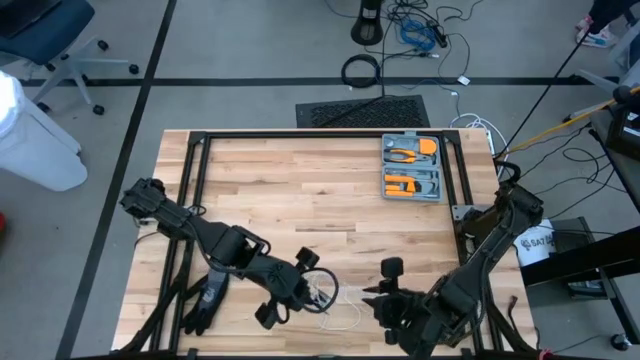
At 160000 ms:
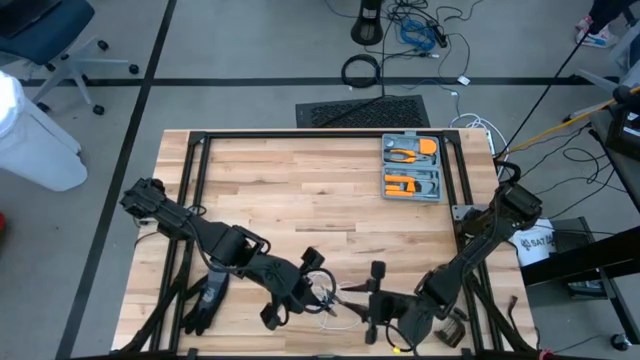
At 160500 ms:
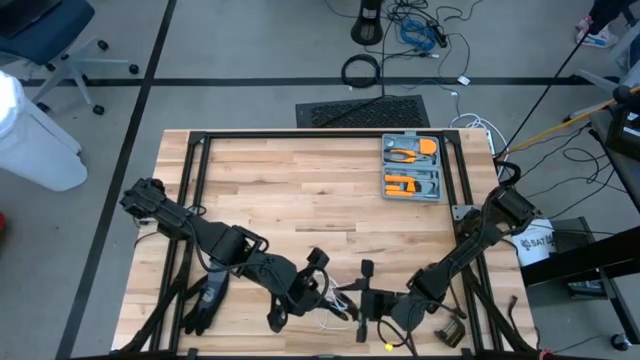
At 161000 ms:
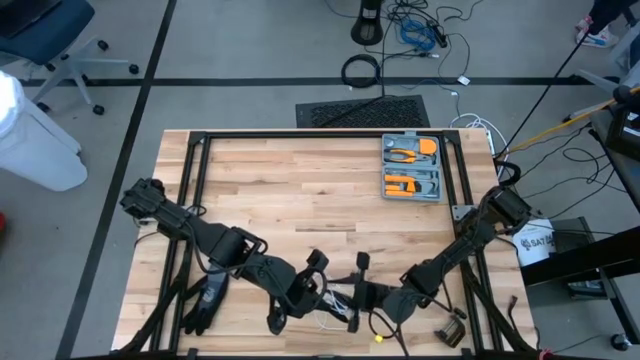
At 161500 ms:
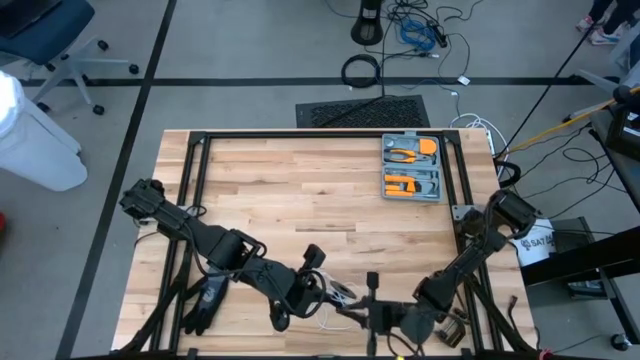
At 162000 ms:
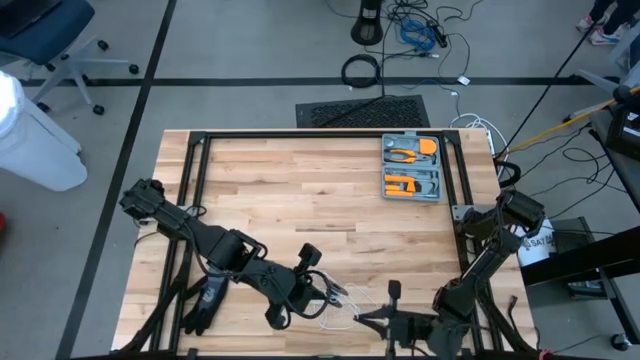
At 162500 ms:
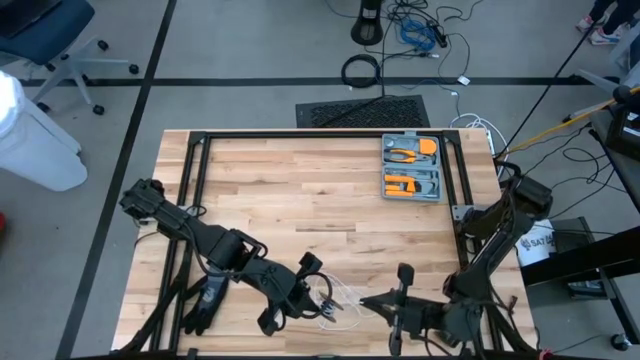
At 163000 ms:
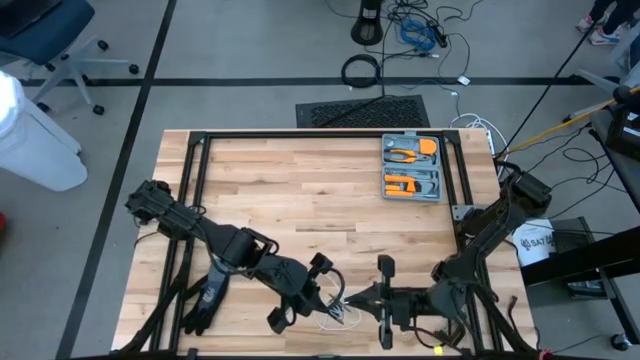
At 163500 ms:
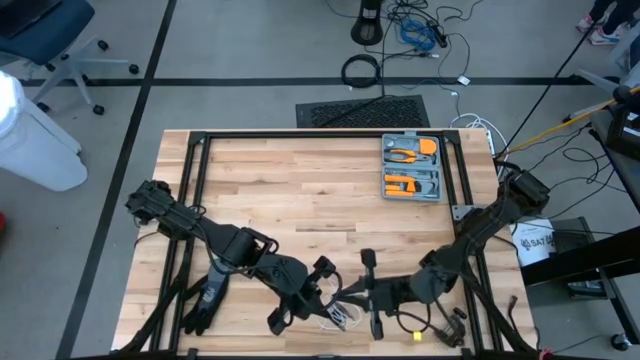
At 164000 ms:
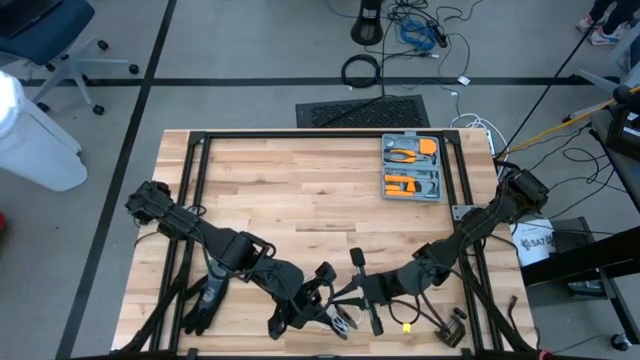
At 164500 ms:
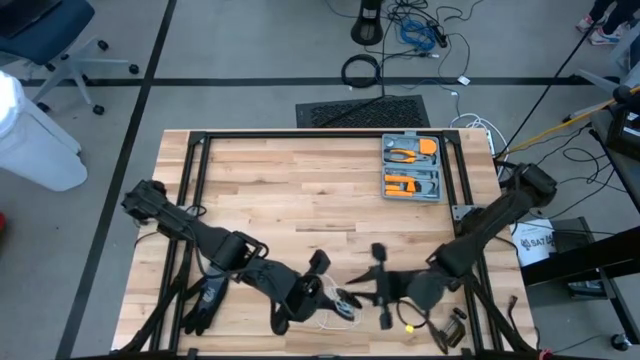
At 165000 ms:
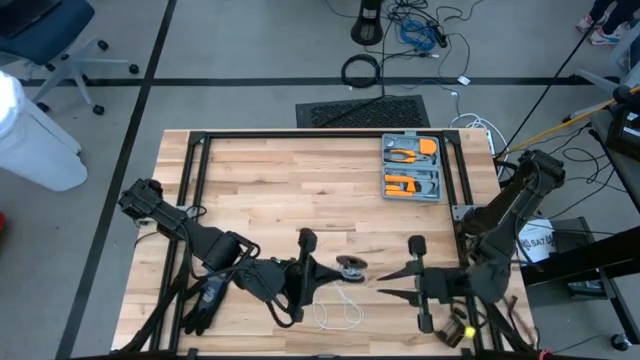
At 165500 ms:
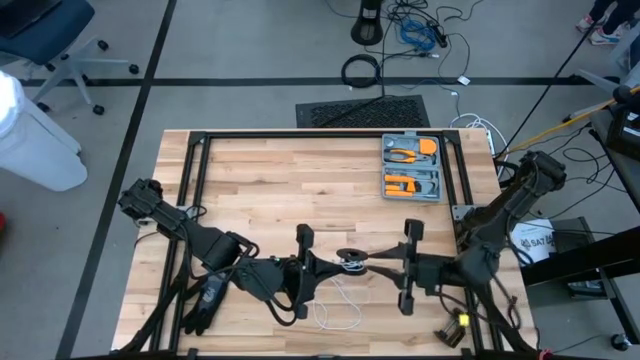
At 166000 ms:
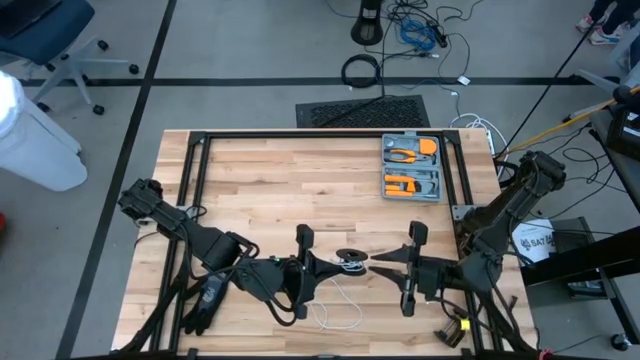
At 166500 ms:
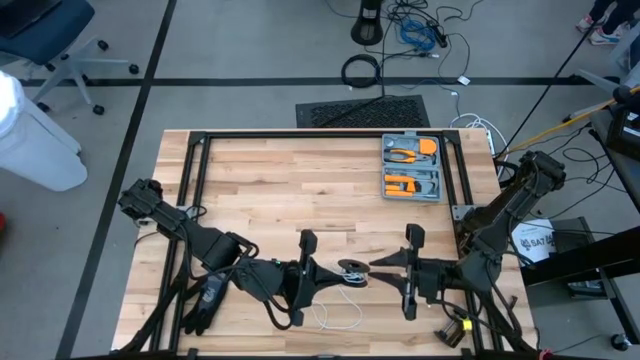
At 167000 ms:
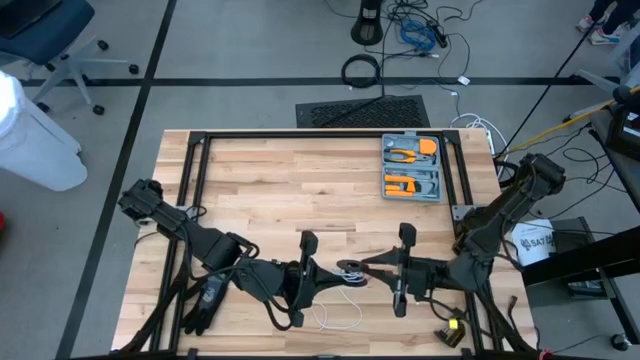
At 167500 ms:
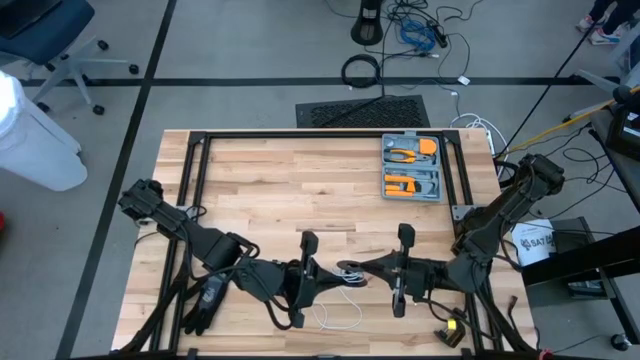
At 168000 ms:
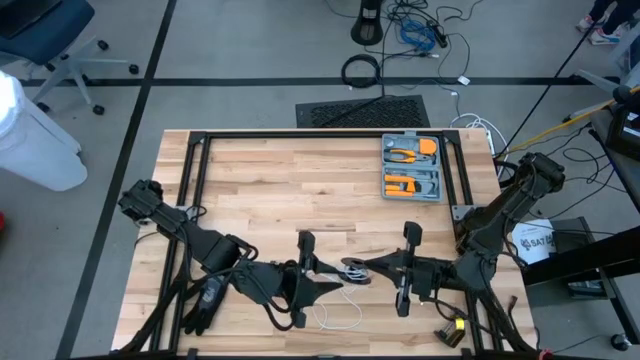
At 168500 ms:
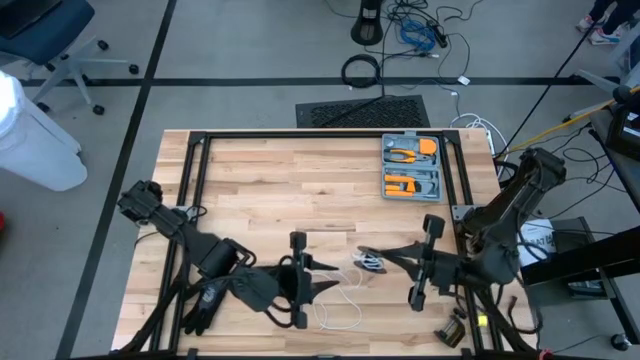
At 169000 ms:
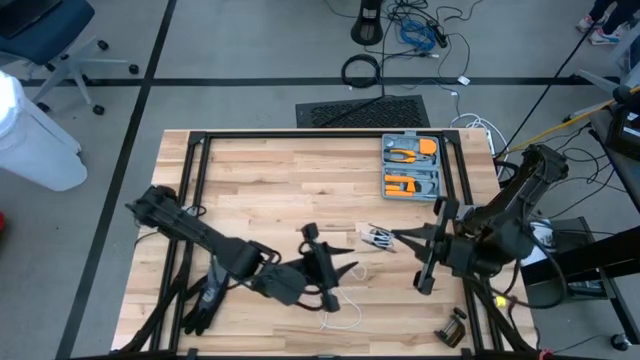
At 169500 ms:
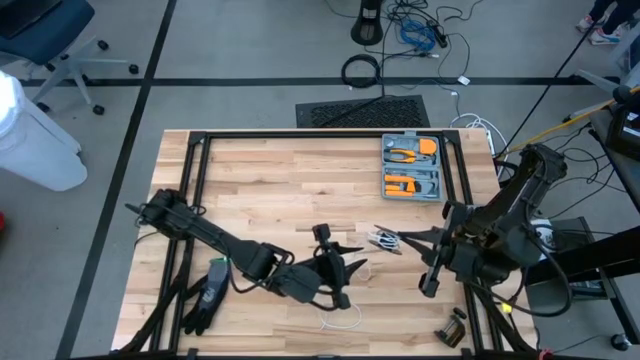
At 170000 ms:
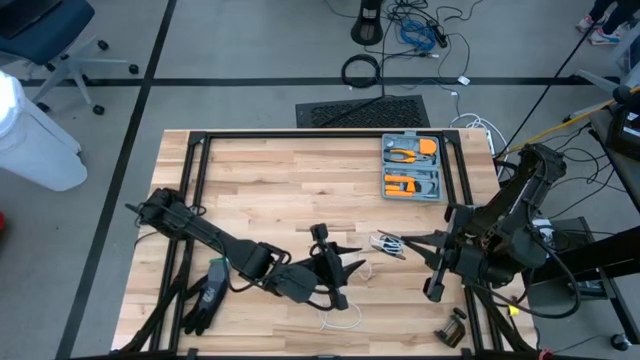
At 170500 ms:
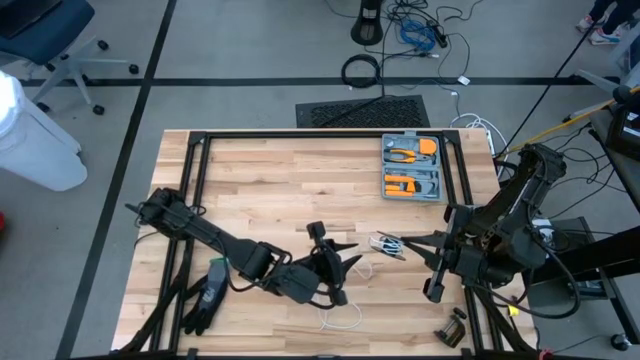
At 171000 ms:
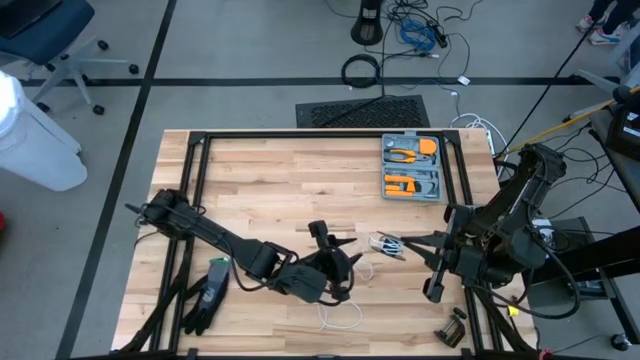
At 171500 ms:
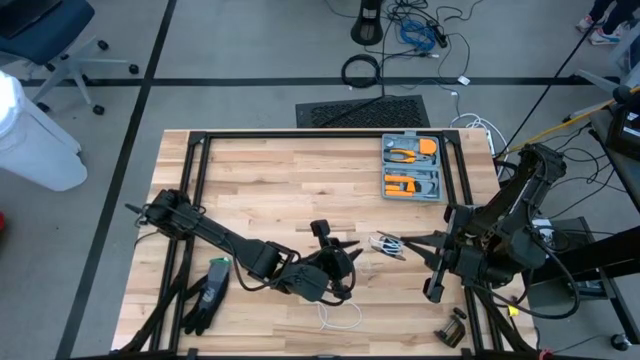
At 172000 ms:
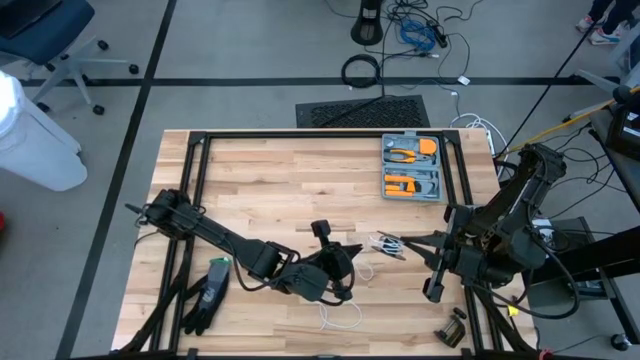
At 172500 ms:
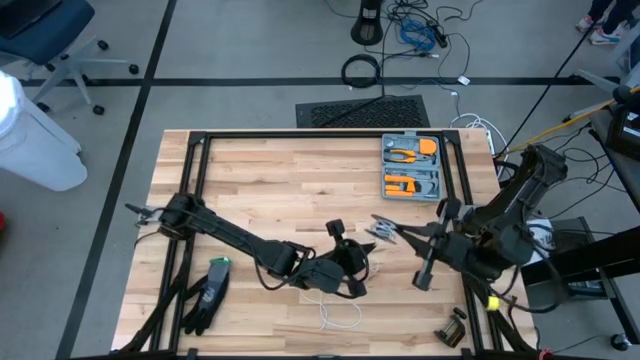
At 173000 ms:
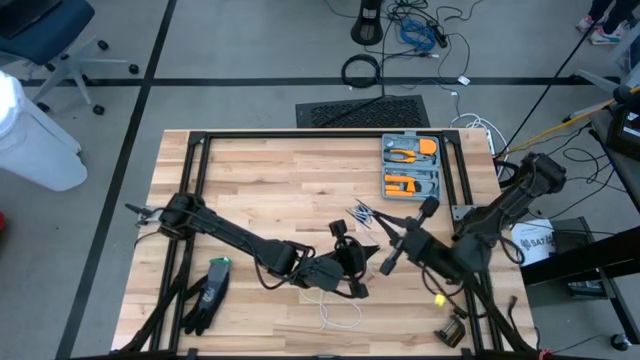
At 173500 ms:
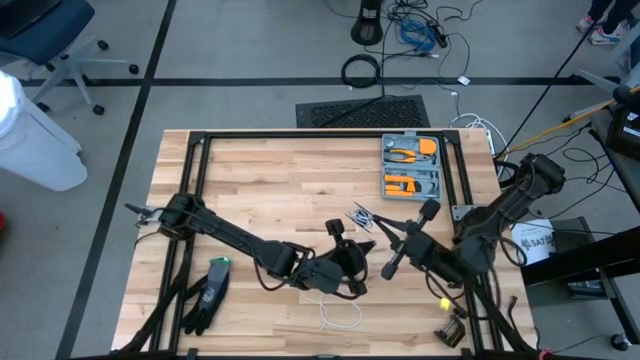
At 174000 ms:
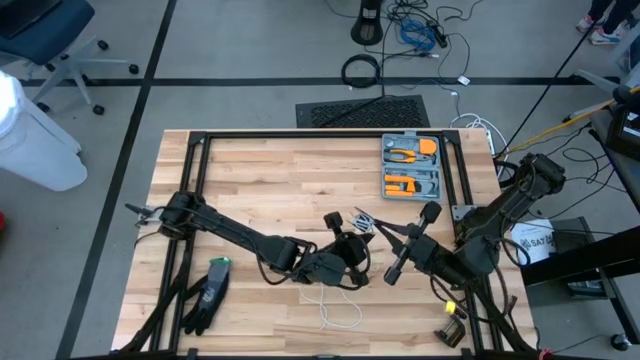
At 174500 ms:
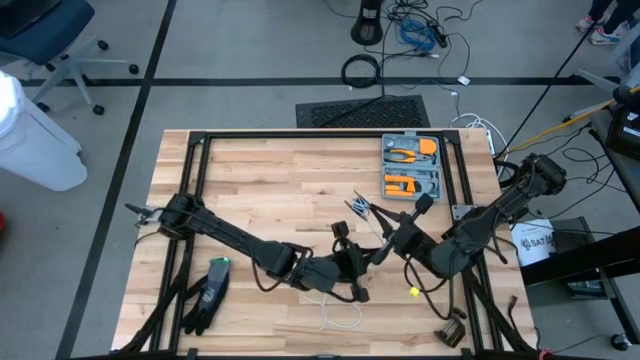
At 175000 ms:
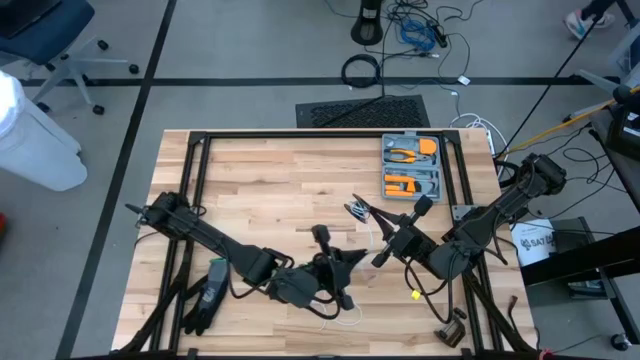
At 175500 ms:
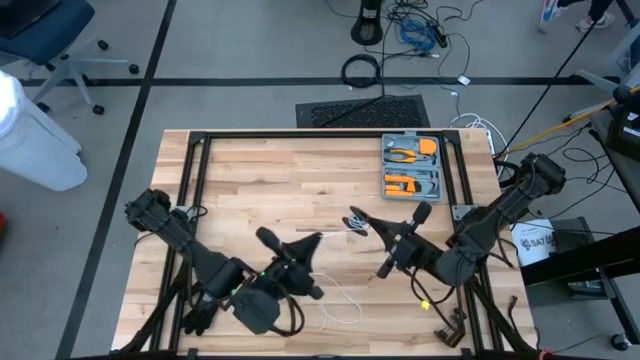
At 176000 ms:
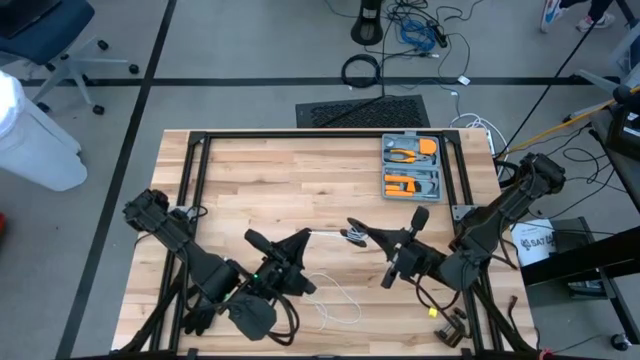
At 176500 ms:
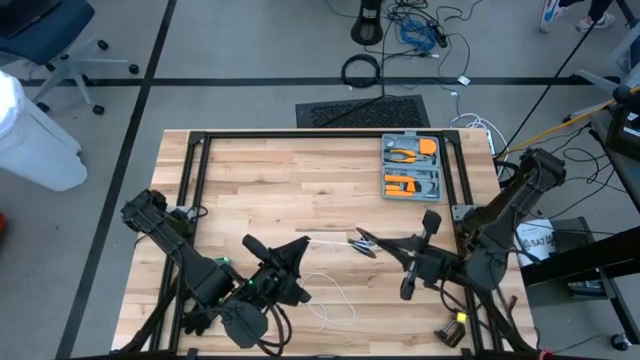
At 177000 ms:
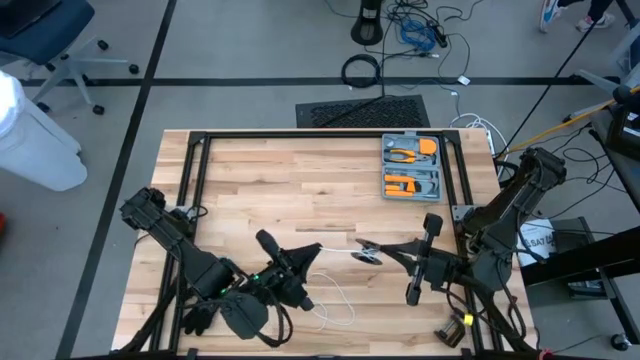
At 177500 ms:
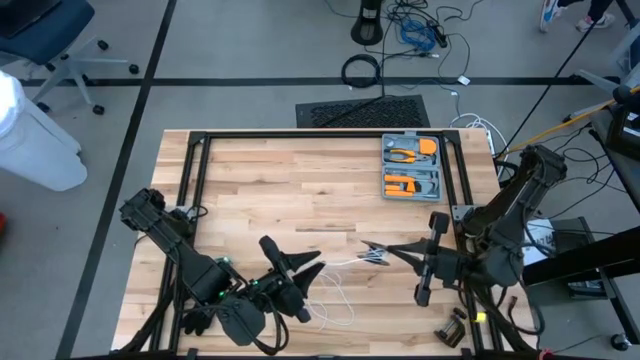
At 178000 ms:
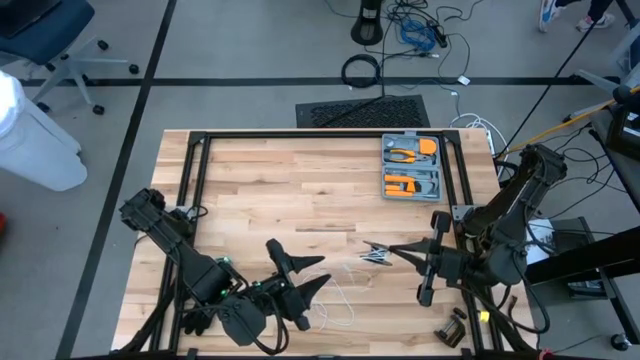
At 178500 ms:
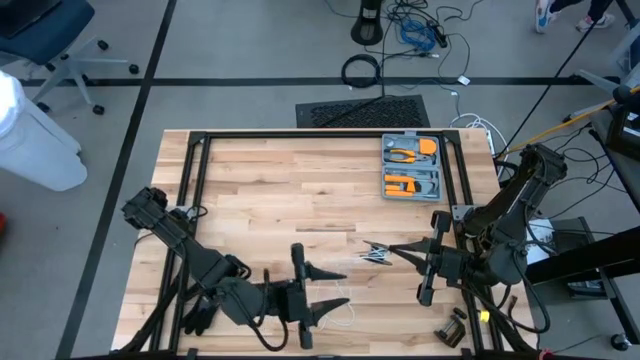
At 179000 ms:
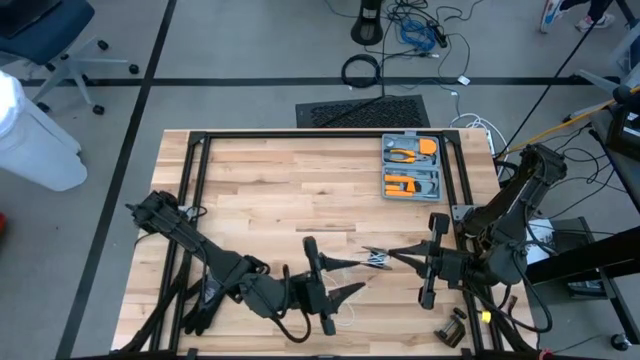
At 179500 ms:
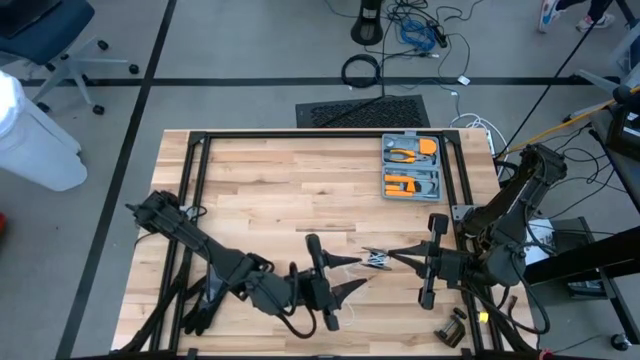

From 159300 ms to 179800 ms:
Task: Coil cords
Coil the white wire onto the spool
